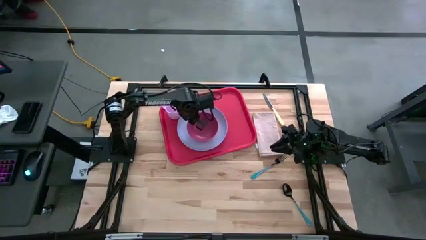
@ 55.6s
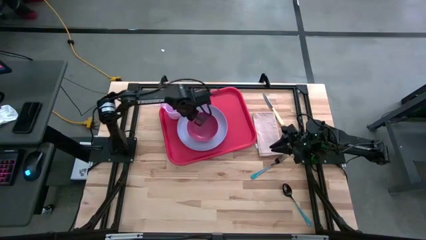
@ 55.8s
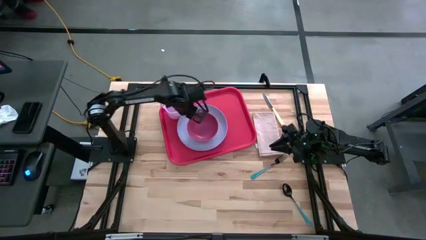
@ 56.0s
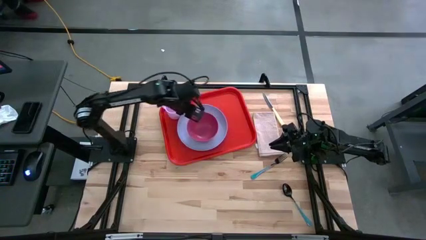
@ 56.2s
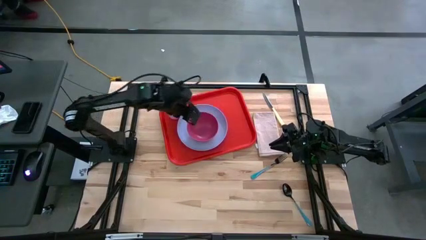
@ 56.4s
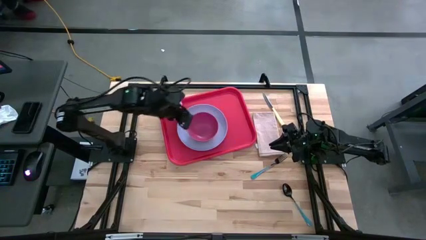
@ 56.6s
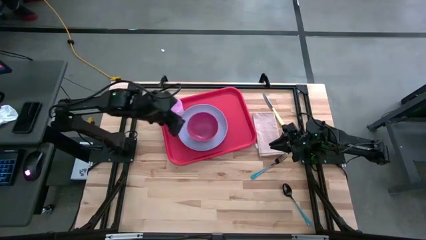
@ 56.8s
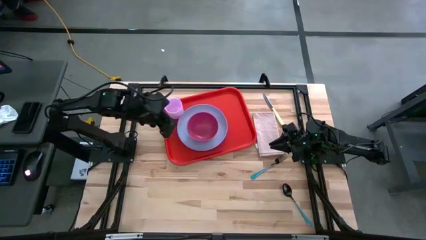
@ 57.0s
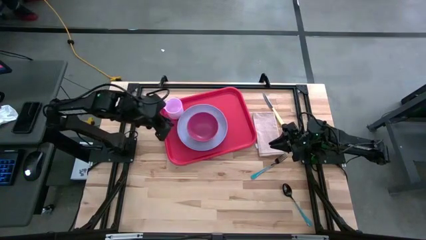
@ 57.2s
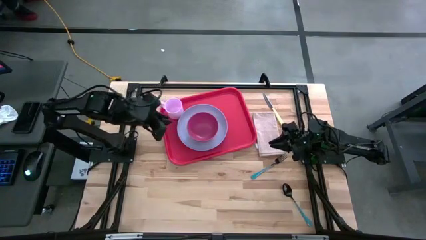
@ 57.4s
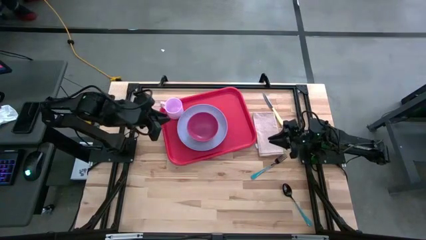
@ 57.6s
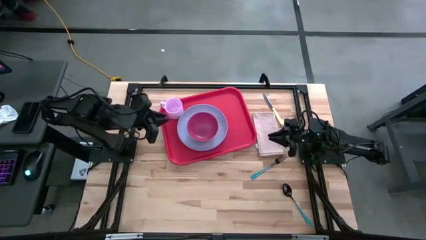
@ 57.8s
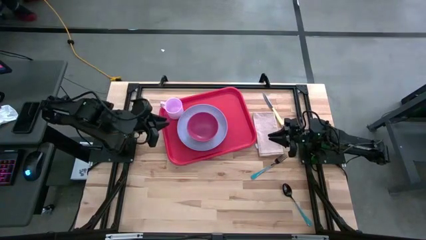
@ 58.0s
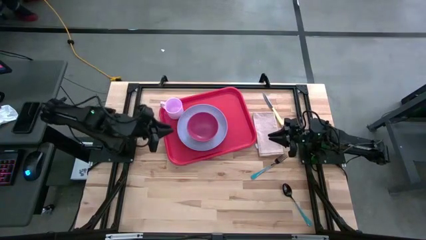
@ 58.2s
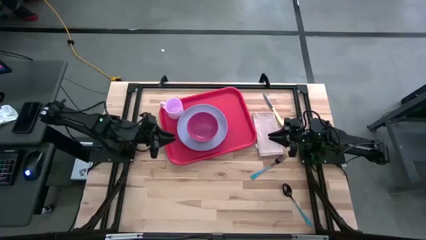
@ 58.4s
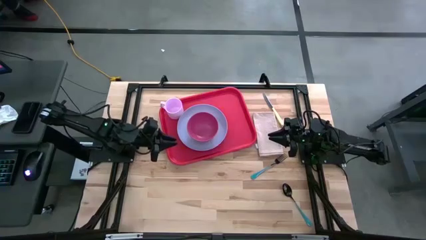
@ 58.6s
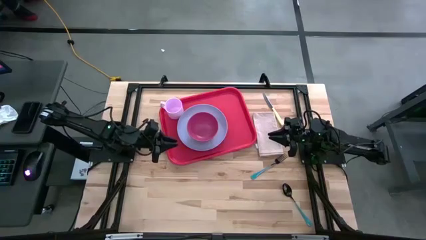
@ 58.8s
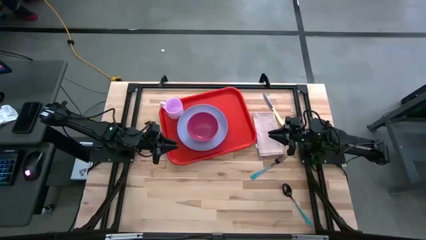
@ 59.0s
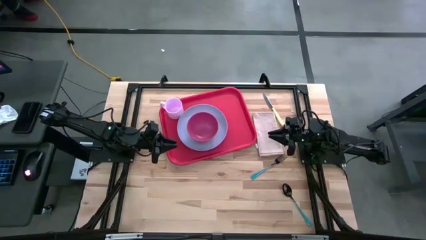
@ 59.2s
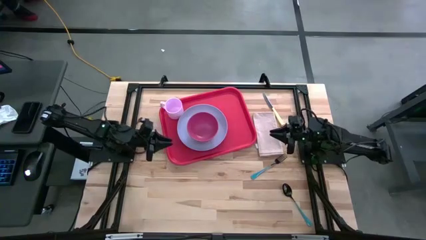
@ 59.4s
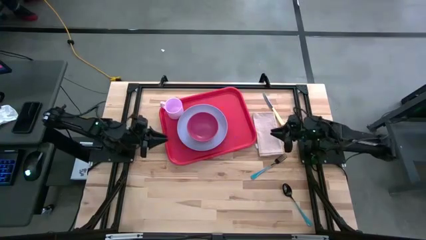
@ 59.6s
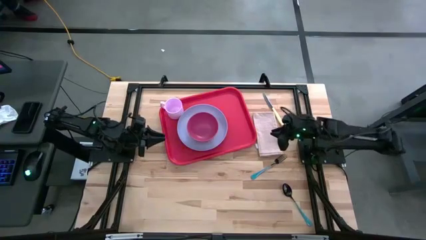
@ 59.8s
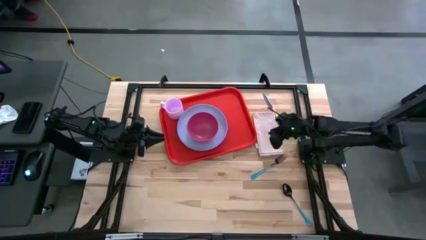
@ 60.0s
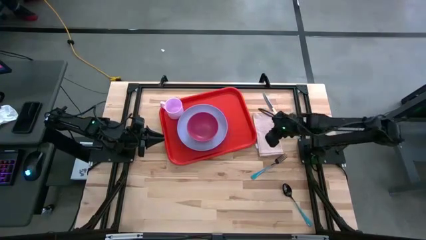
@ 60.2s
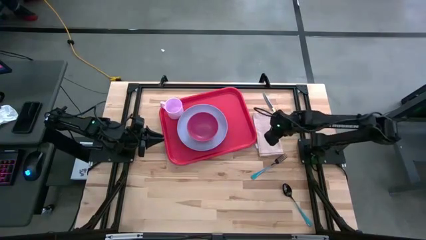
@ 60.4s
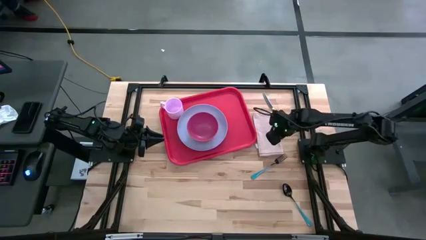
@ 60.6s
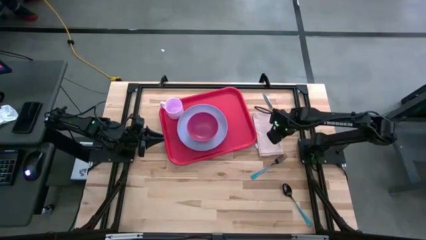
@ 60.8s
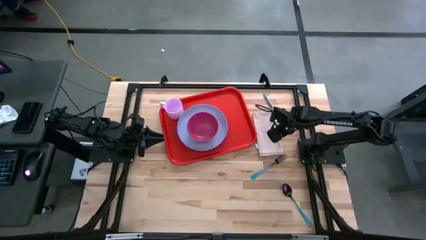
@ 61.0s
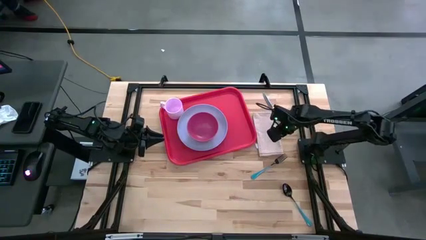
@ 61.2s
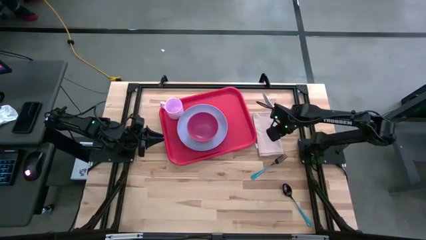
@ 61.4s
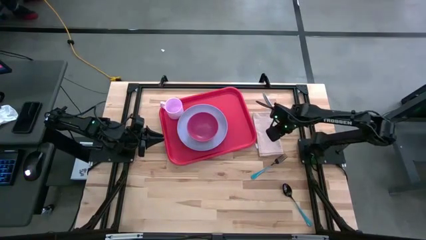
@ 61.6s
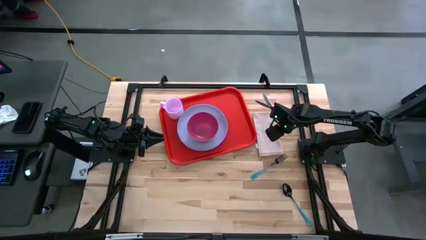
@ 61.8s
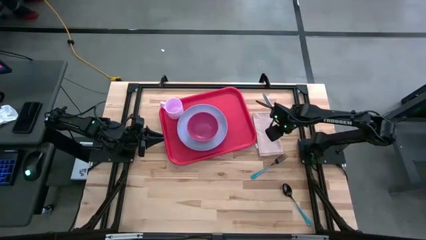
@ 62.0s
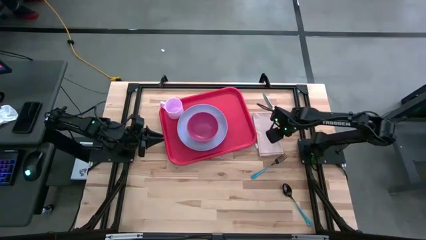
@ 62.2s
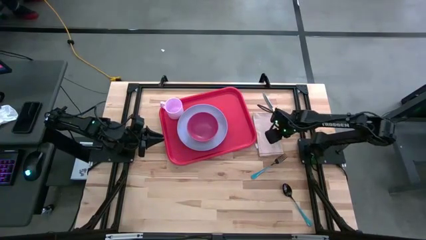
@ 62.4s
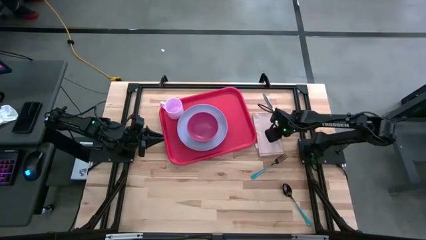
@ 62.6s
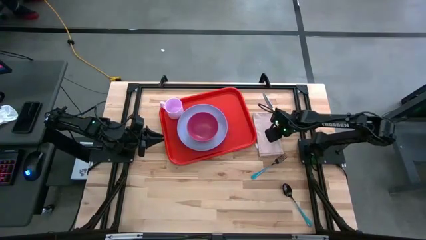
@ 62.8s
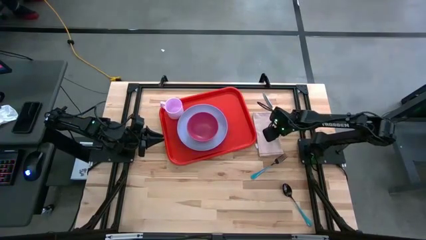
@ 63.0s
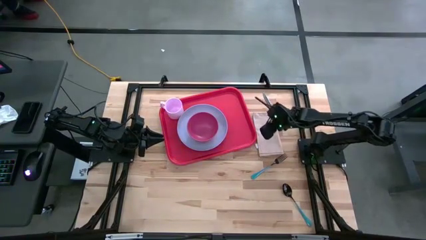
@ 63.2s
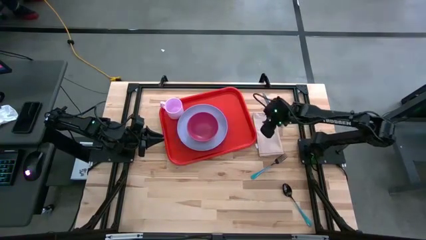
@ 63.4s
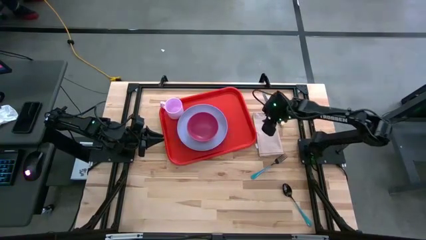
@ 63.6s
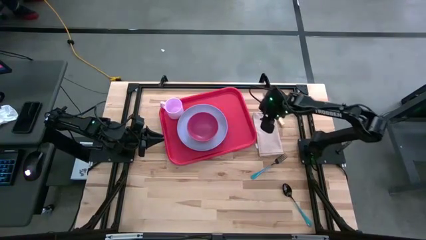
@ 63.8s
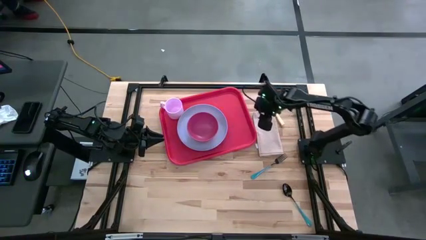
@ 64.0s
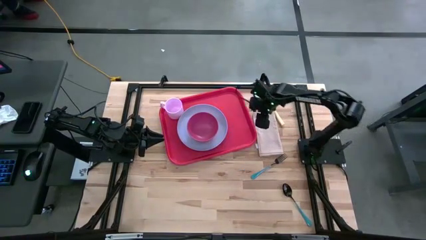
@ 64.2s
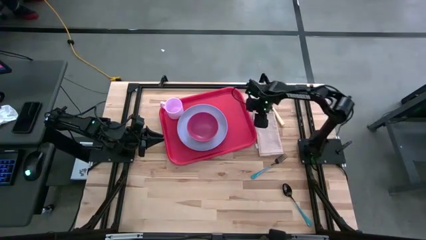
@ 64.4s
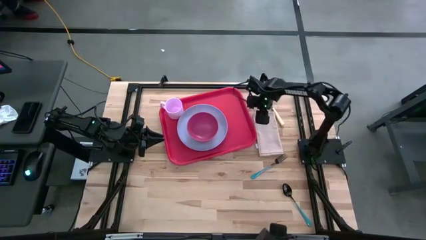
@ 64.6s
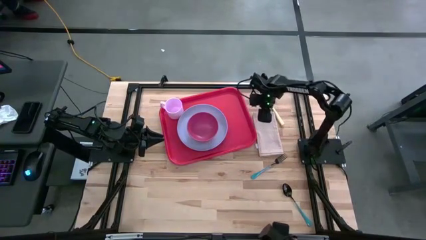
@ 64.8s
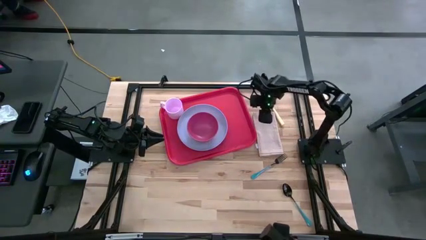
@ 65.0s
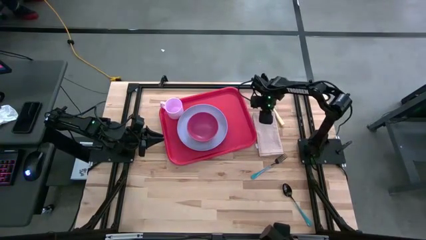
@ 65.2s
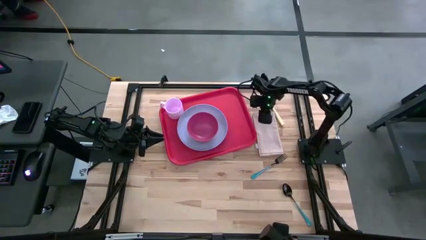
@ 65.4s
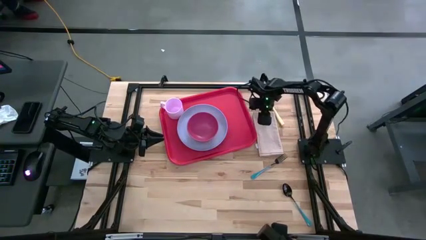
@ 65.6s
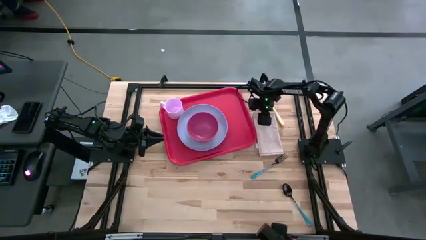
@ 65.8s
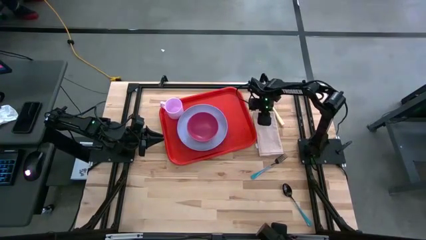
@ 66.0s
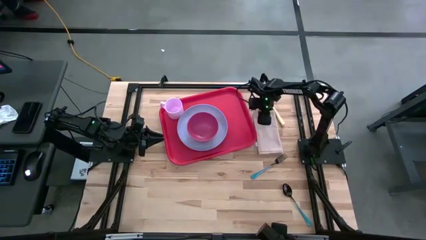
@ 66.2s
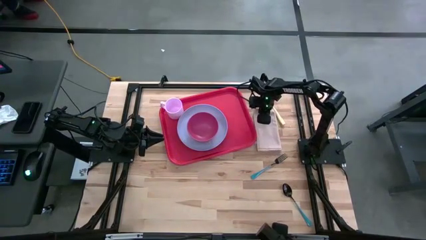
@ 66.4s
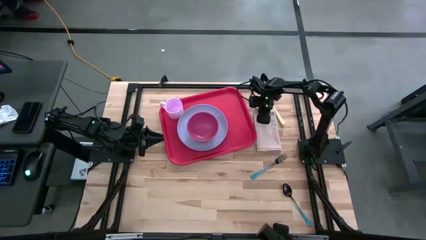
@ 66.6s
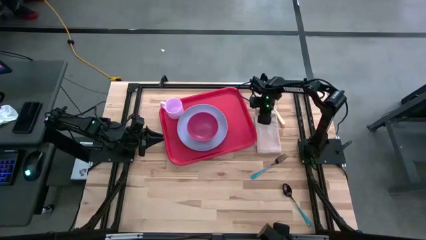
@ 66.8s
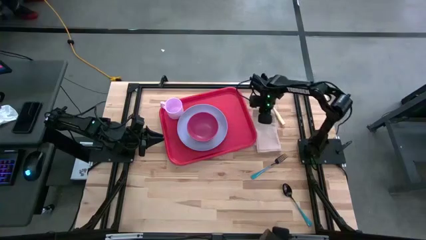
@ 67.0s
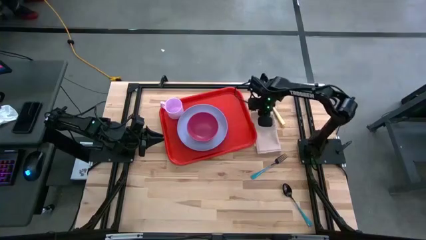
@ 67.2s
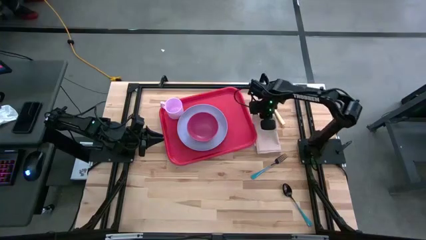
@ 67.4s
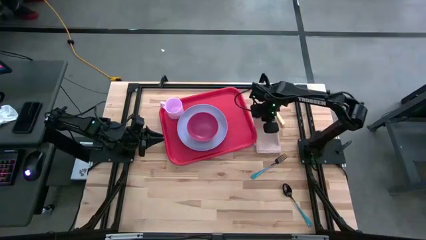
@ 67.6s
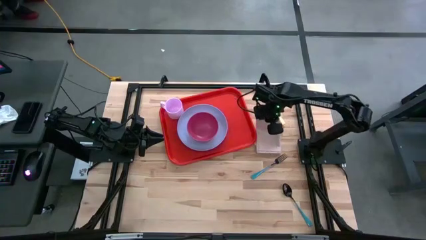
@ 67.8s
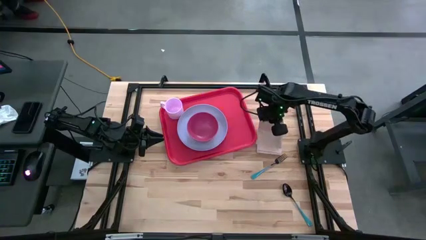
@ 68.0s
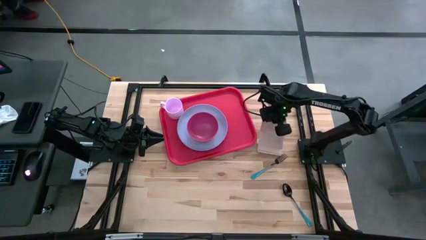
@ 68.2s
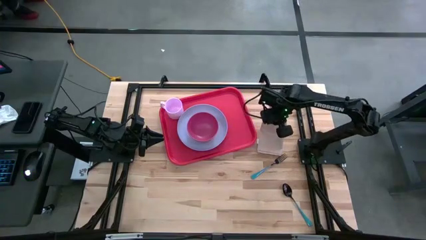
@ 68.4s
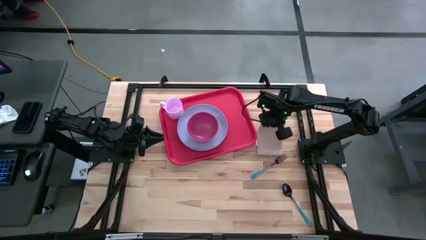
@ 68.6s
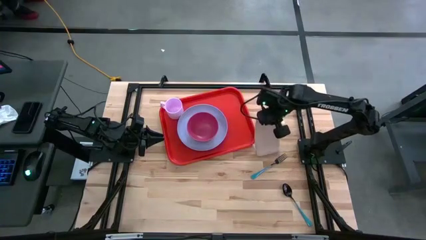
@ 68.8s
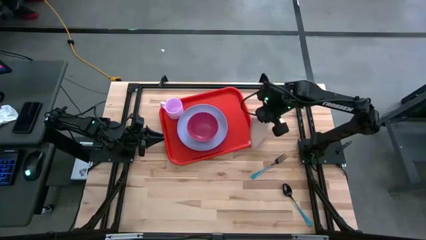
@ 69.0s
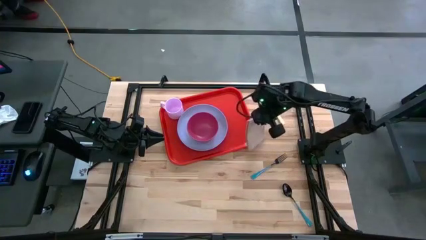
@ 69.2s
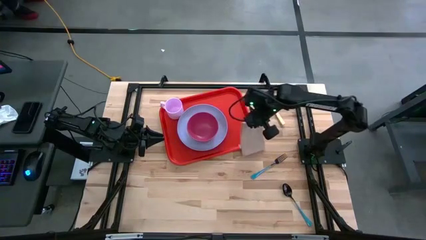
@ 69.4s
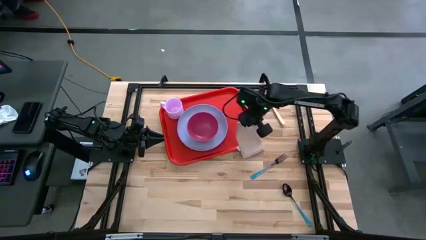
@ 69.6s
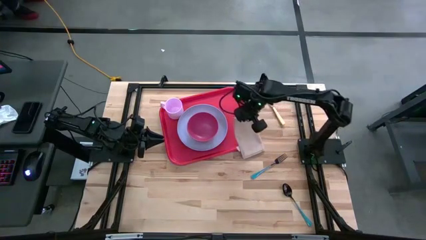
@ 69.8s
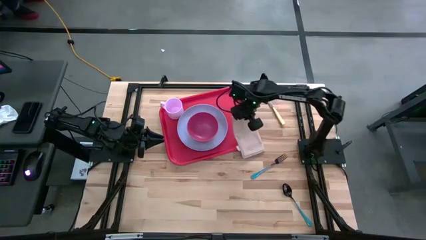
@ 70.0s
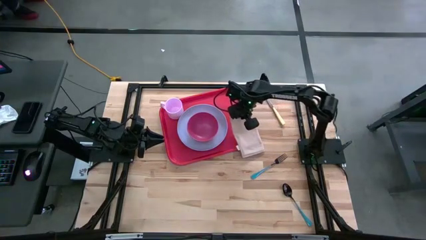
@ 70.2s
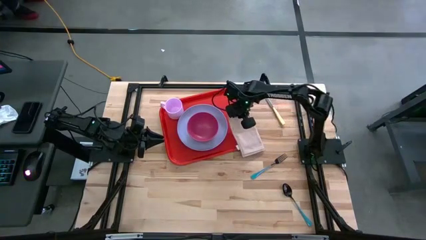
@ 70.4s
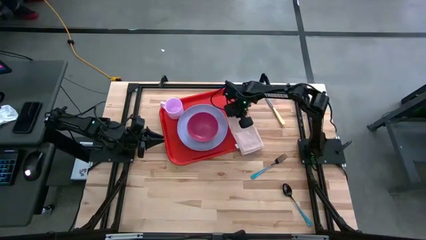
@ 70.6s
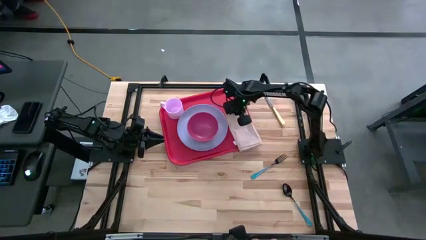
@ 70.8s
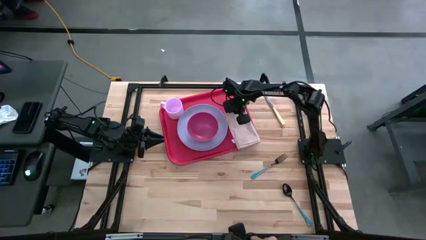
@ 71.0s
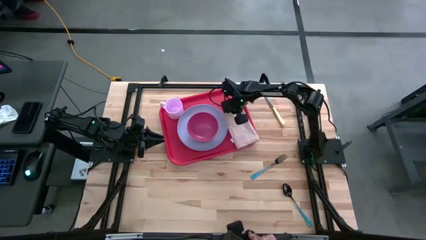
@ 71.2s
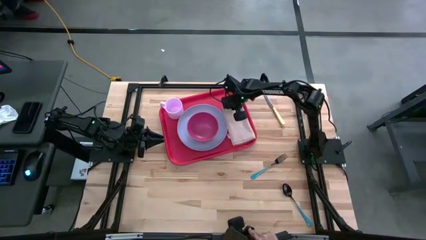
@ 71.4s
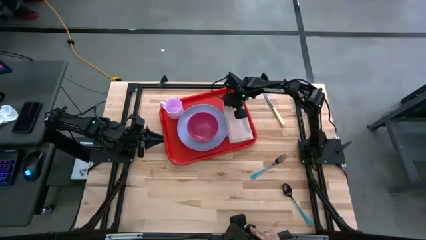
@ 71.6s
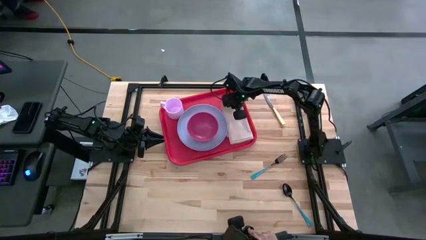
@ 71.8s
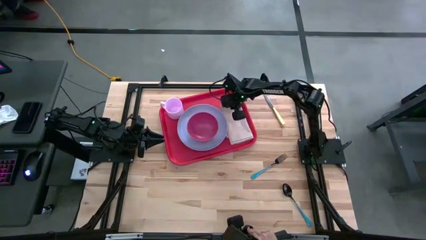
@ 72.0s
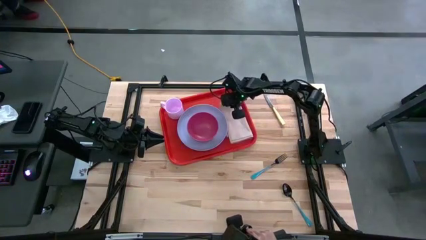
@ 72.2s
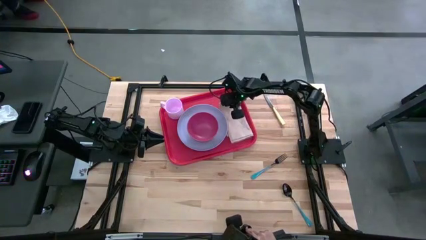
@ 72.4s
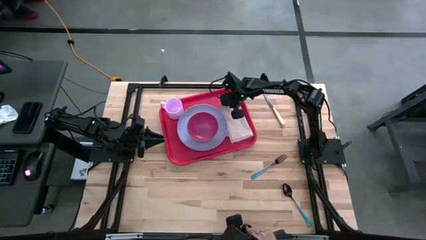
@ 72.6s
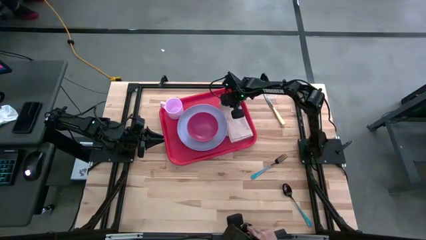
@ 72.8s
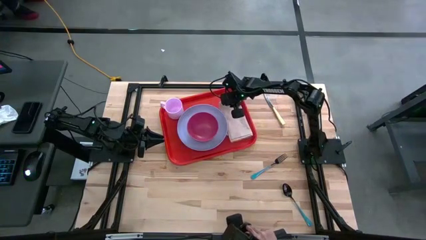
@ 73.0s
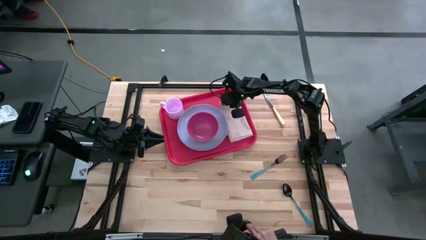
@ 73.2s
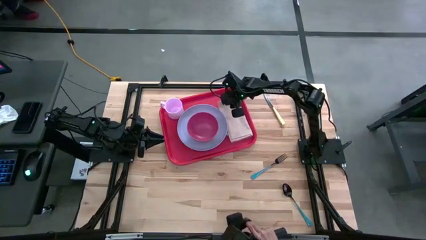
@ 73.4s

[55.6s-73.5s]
Task: Set up tray
Put the brown napkin on the red tray to the right of the purple plate
